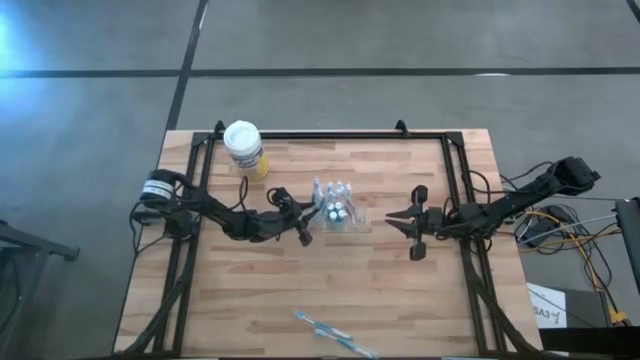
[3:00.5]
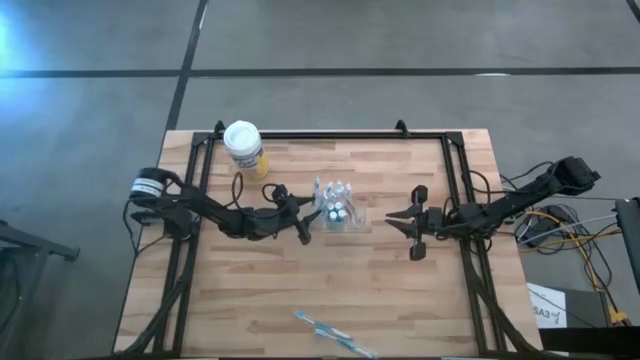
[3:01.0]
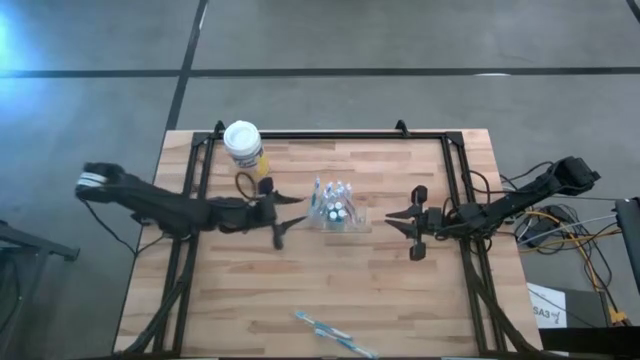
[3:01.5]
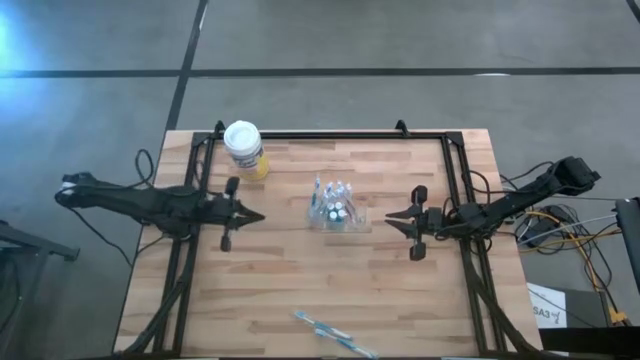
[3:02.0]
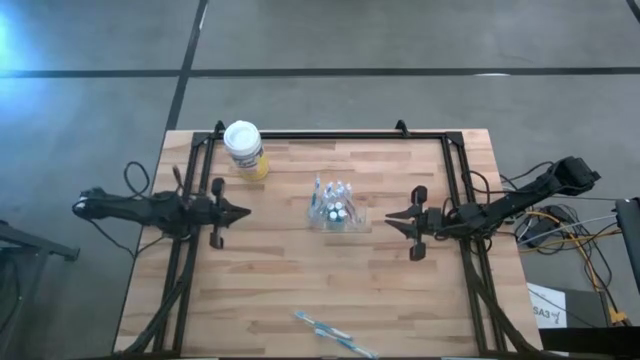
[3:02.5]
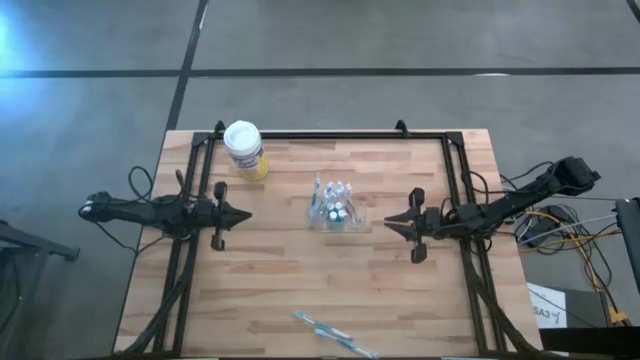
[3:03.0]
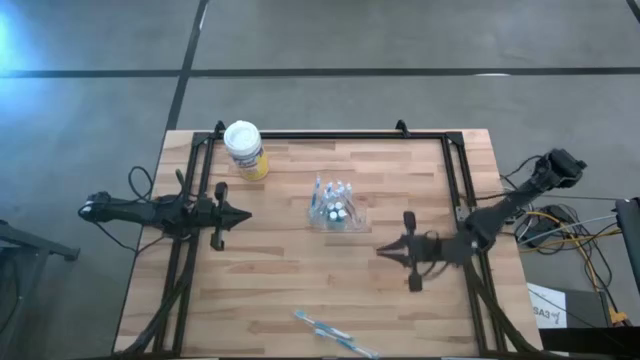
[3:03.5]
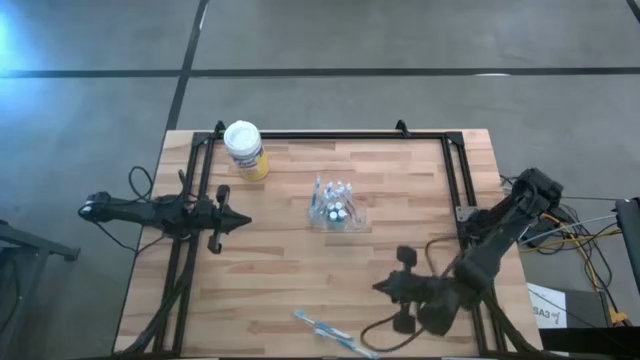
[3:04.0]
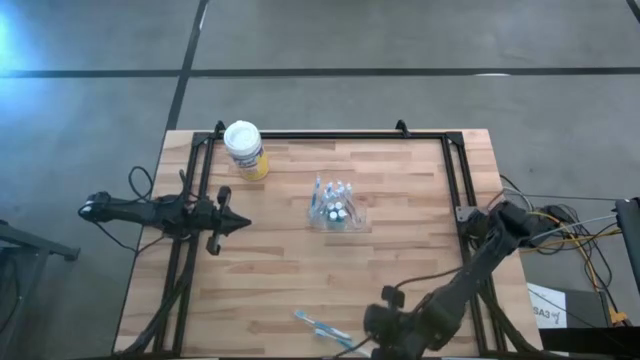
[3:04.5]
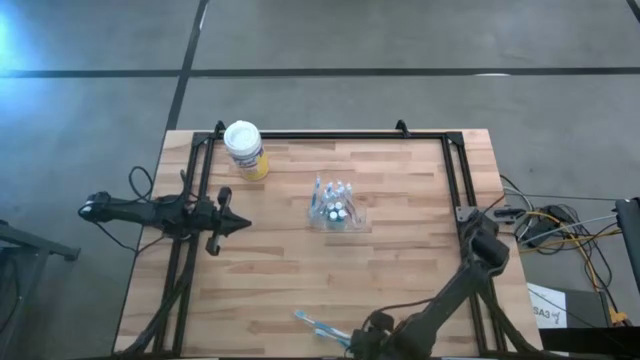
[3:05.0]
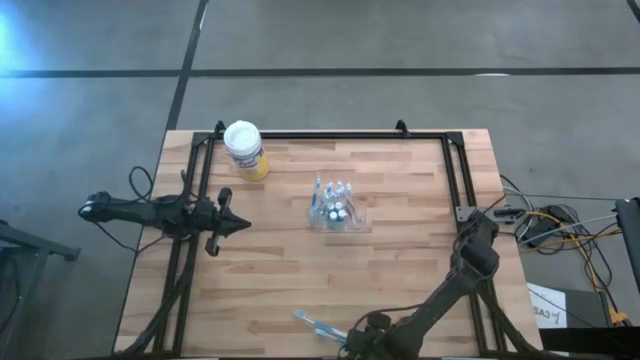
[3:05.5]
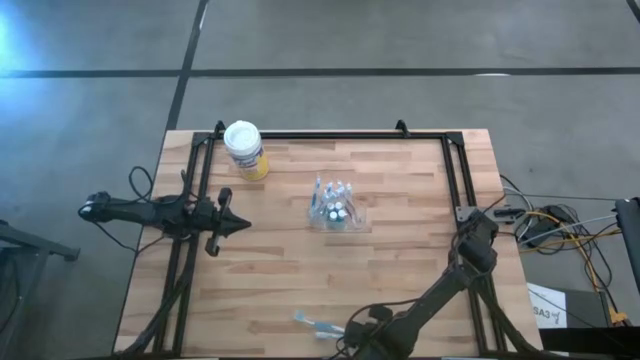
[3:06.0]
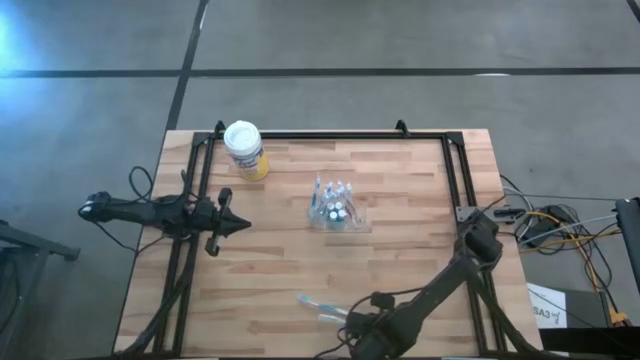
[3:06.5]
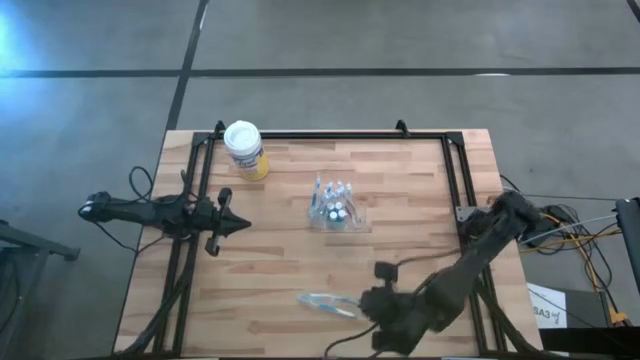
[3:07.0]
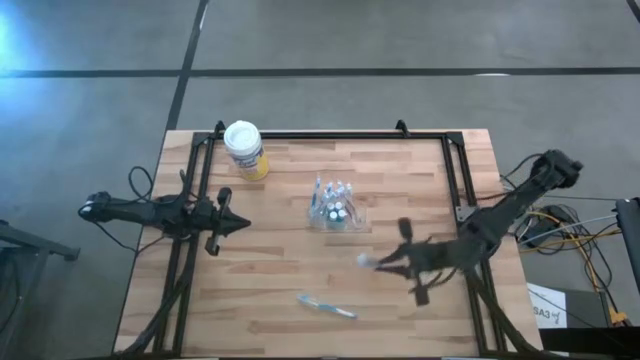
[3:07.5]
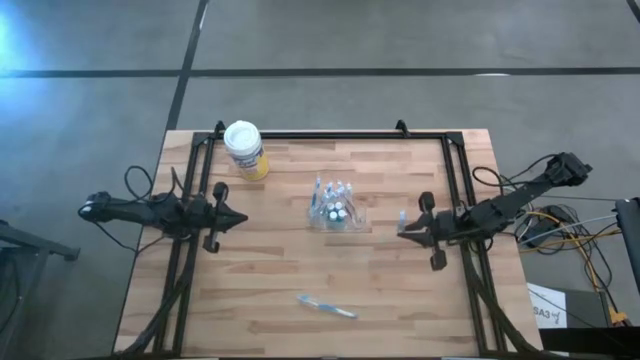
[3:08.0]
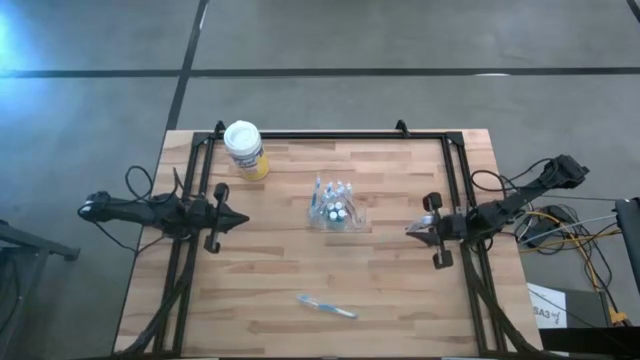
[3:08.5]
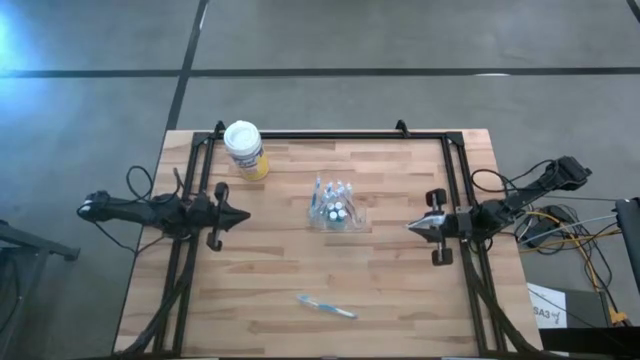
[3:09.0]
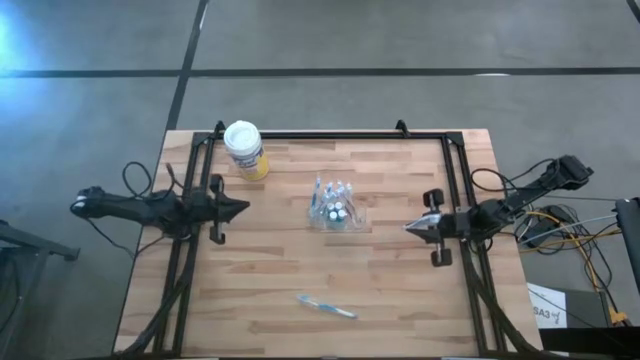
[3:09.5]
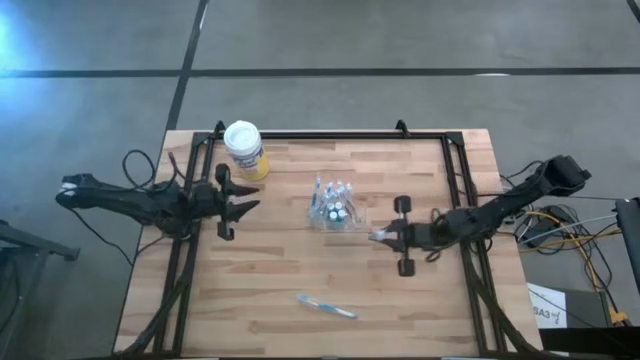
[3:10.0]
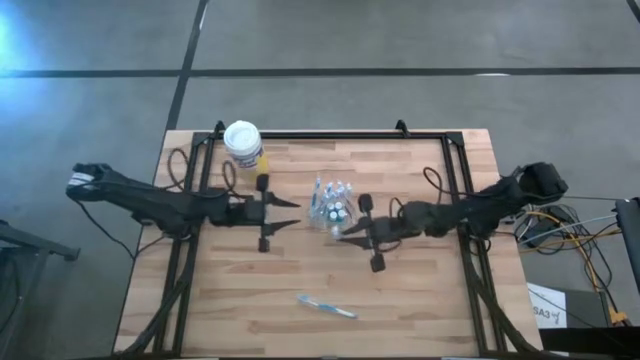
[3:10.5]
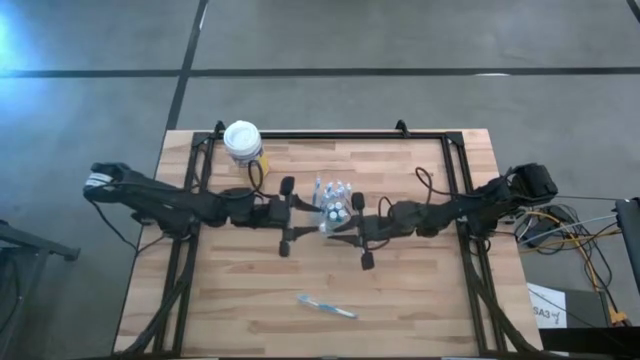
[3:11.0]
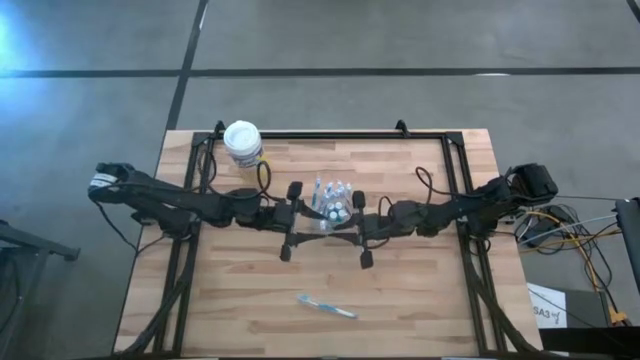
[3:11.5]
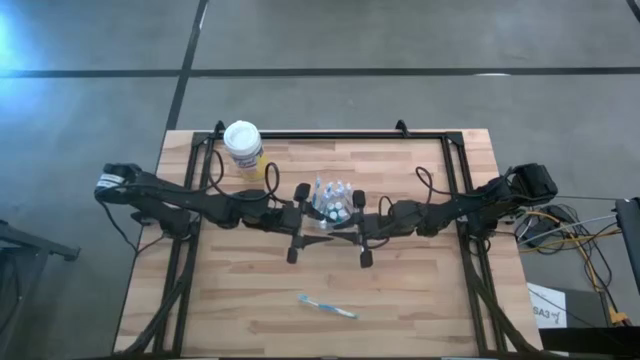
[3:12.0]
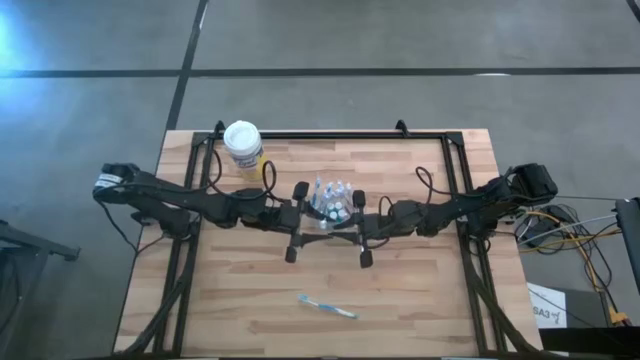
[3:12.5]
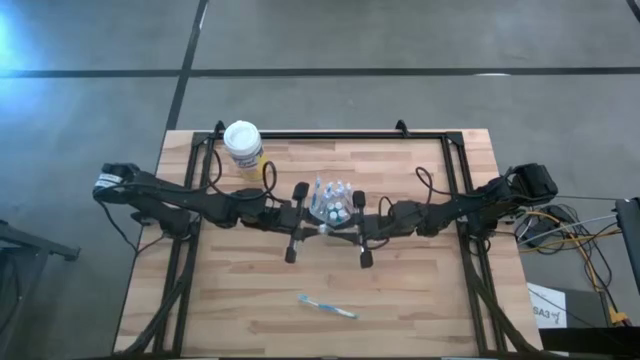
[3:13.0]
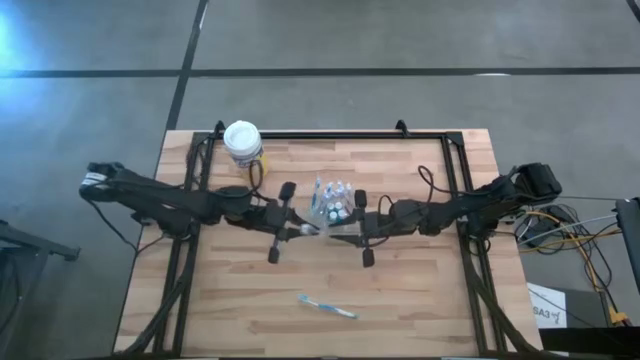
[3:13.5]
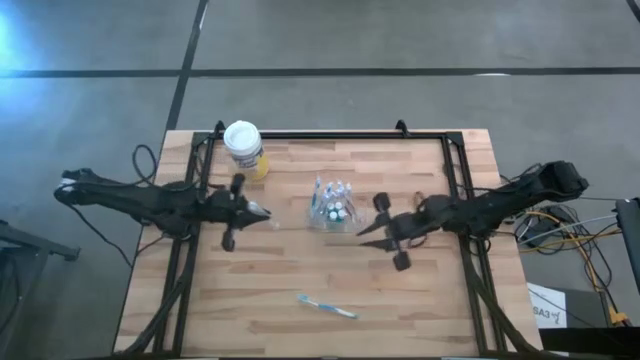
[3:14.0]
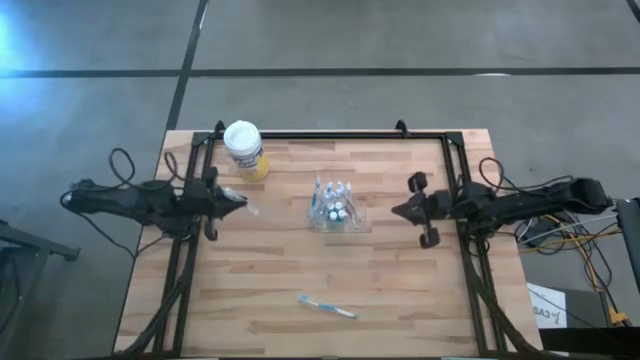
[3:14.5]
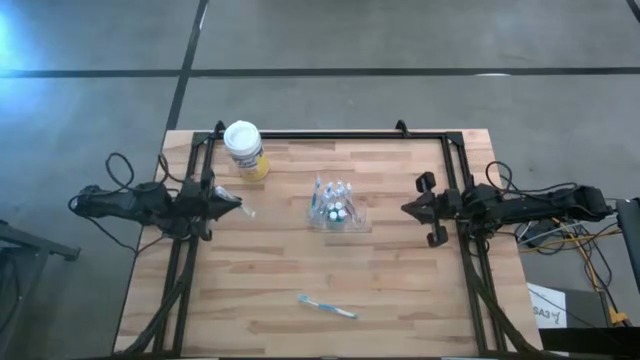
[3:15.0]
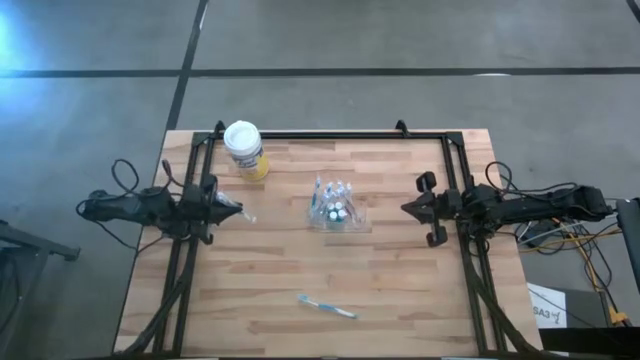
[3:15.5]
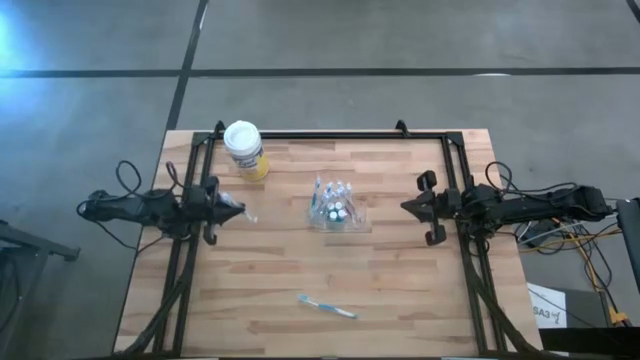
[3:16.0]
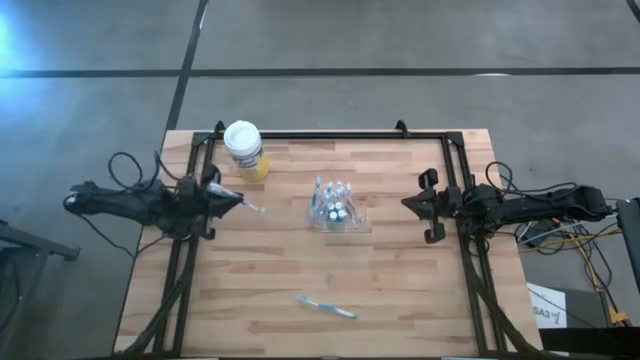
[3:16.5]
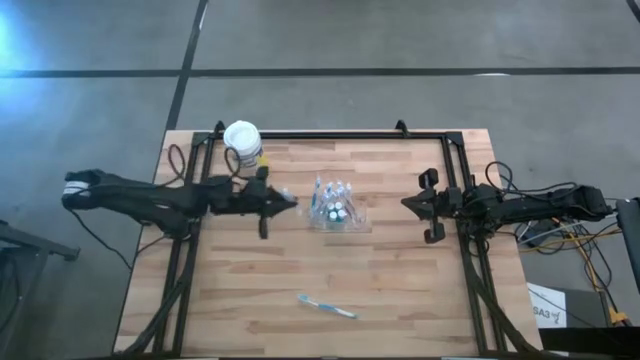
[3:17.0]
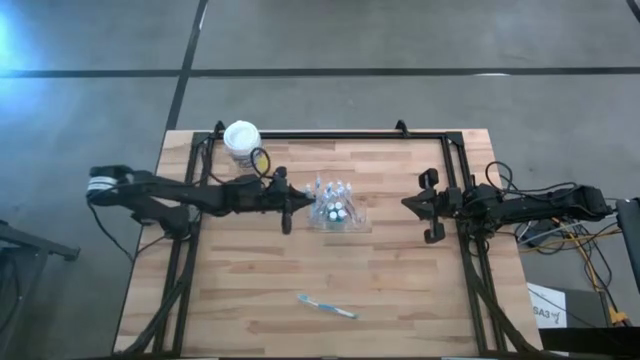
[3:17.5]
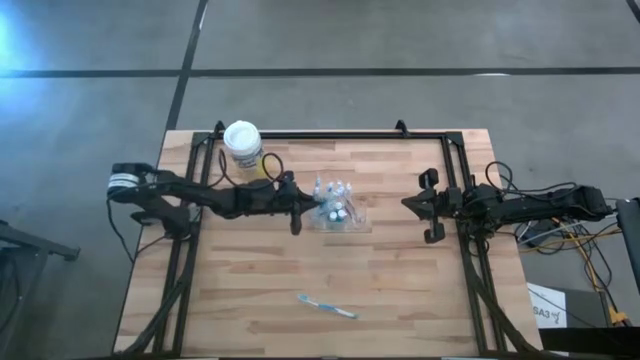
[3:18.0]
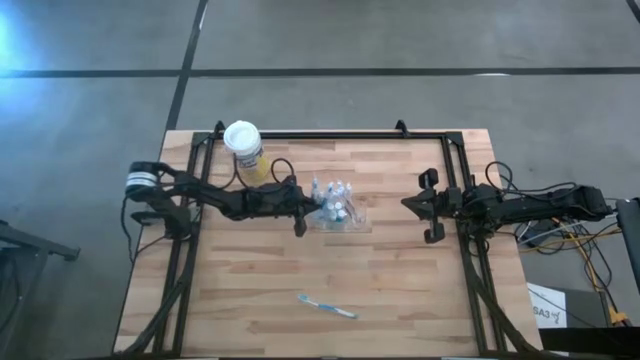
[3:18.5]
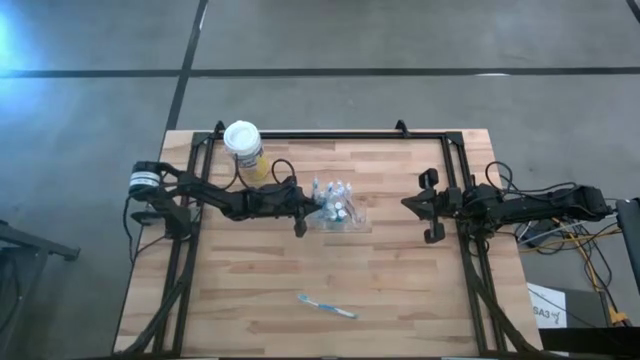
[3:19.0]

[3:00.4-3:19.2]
Task: Pick & Place toothbrushing station
Put the blue toothbrush into the left compartment of the transparent organizer

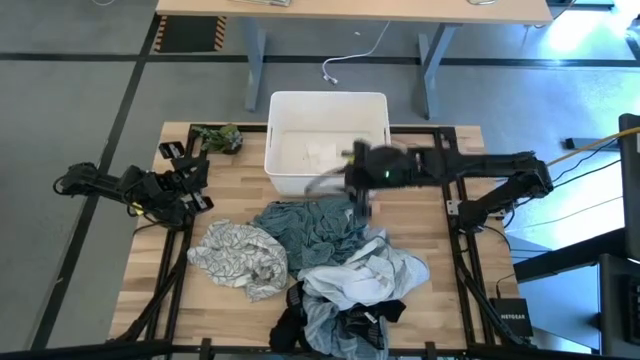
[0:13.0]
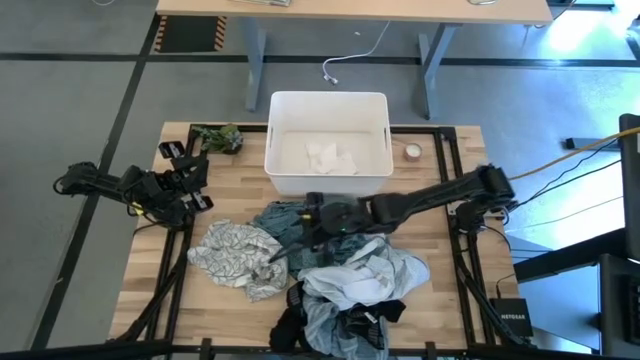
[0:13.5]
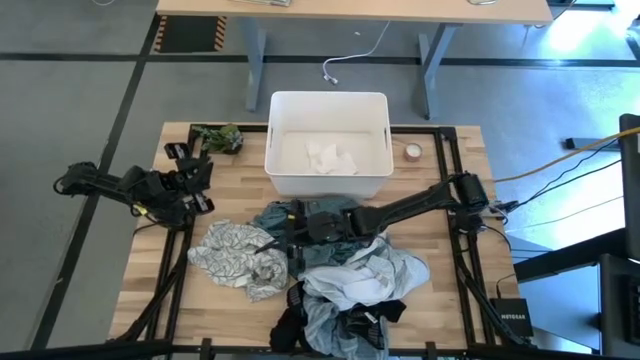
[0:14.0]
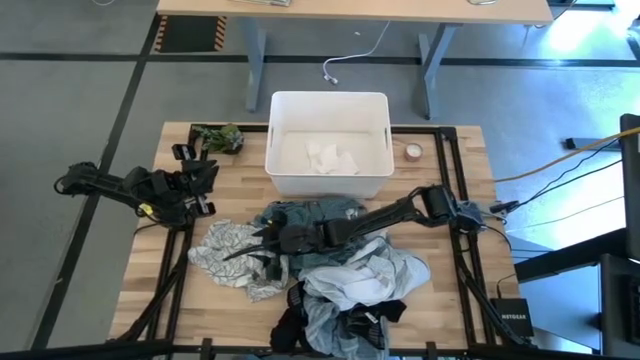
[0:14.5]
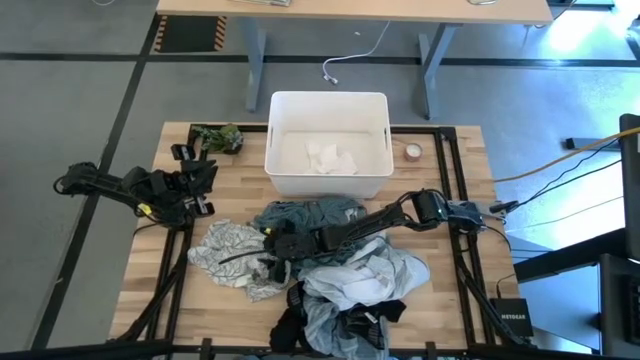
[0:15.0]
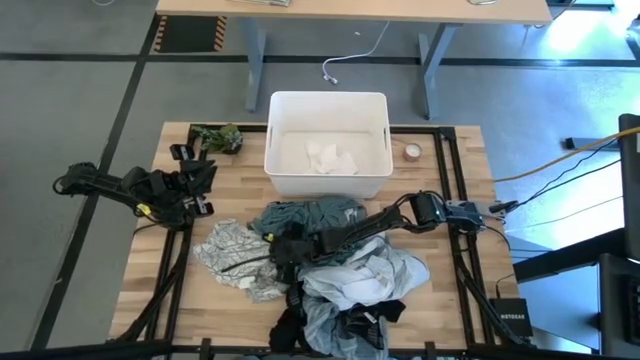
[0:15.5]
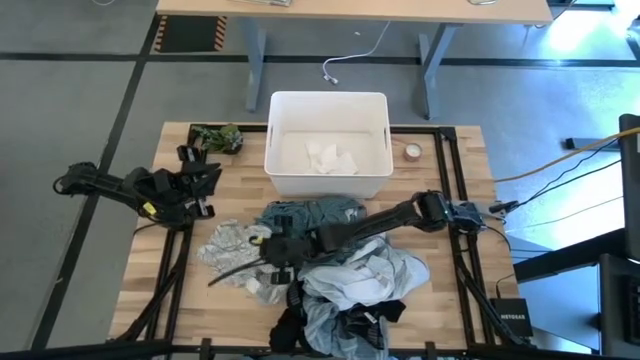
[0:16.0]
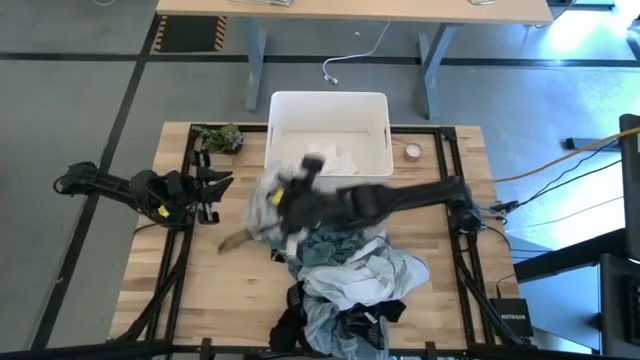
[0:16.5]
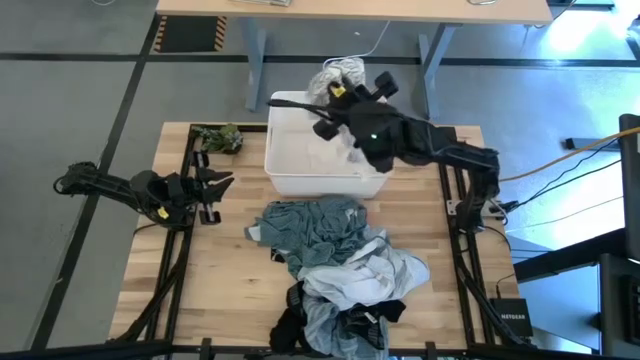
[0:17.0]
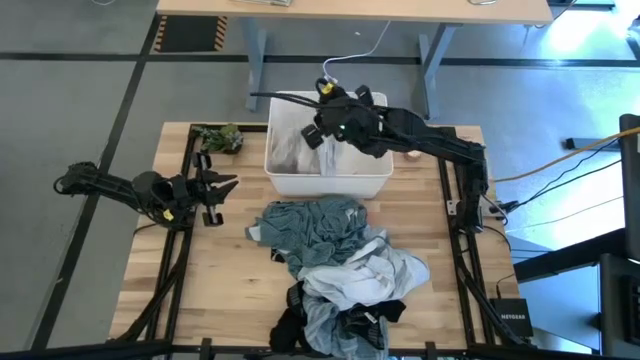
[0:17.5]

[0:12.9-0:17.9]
Task: Sort clothes
Put the white patterned shirt into the white laundry bin
